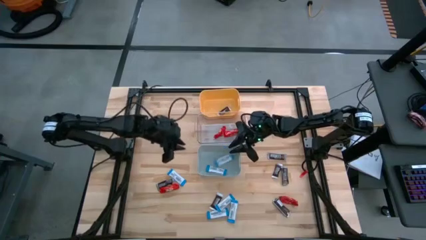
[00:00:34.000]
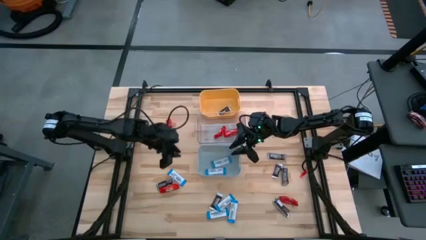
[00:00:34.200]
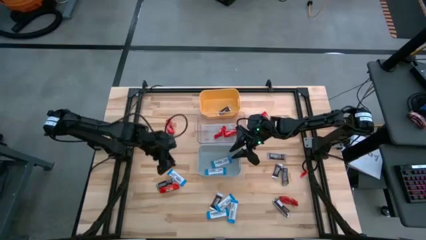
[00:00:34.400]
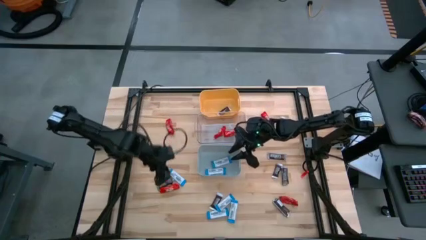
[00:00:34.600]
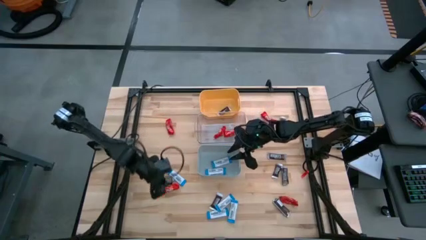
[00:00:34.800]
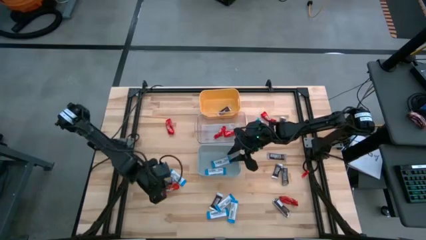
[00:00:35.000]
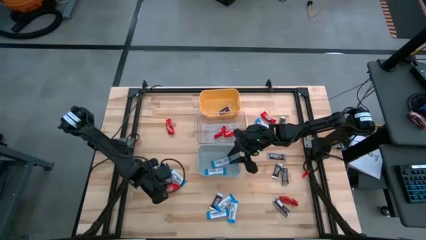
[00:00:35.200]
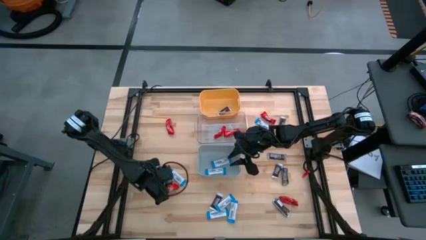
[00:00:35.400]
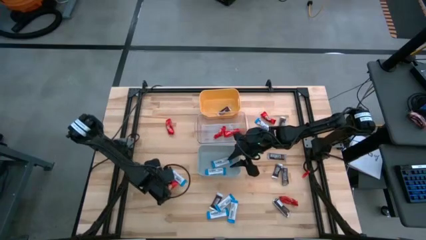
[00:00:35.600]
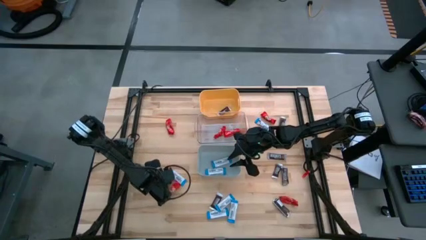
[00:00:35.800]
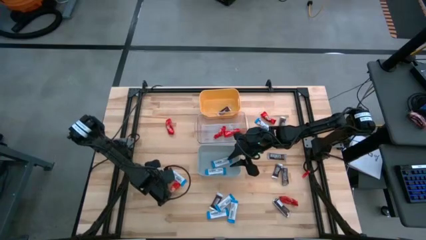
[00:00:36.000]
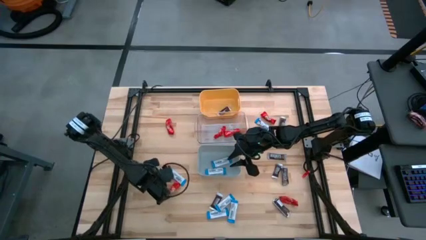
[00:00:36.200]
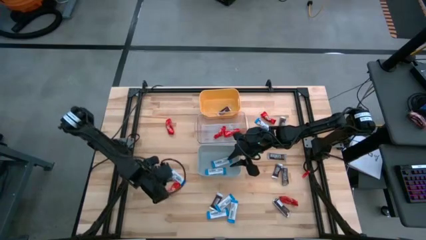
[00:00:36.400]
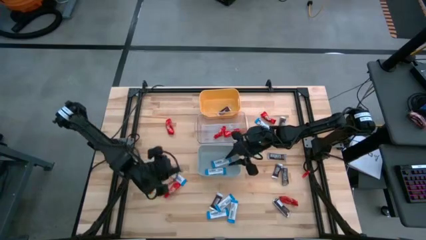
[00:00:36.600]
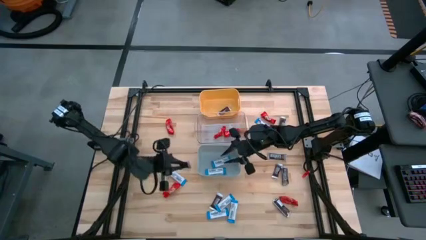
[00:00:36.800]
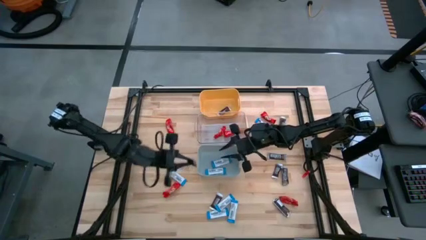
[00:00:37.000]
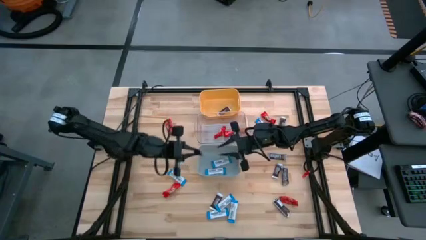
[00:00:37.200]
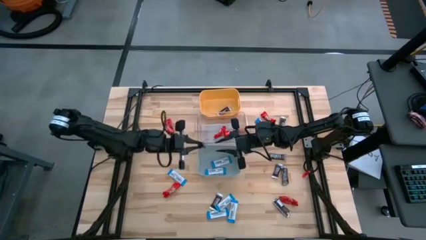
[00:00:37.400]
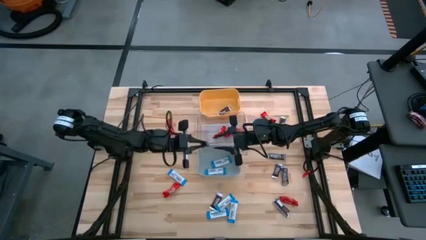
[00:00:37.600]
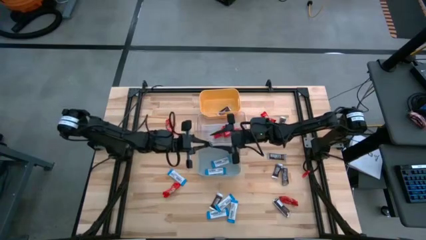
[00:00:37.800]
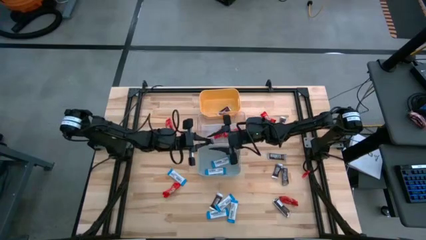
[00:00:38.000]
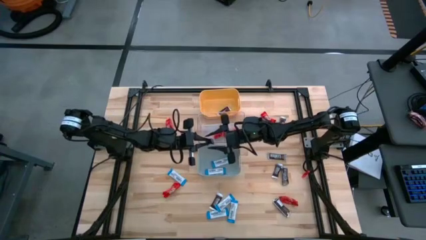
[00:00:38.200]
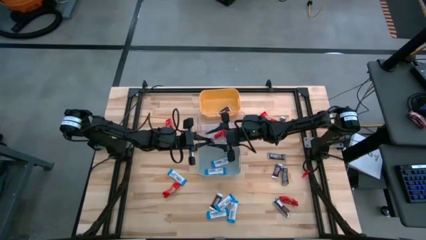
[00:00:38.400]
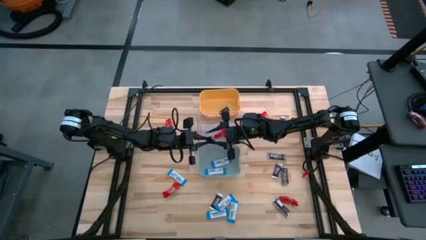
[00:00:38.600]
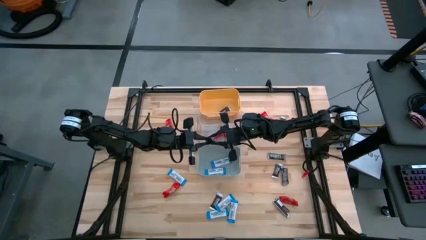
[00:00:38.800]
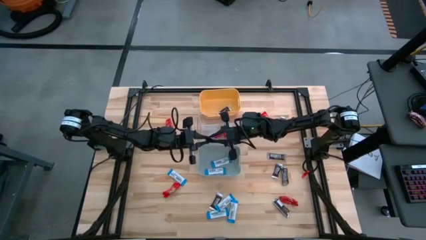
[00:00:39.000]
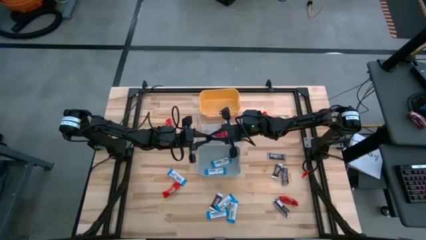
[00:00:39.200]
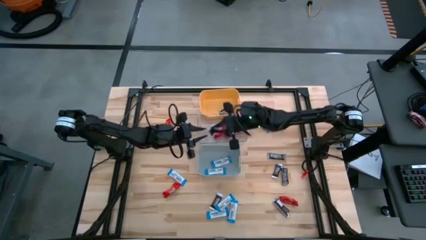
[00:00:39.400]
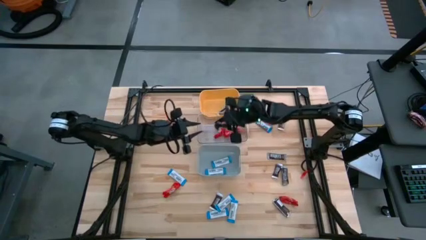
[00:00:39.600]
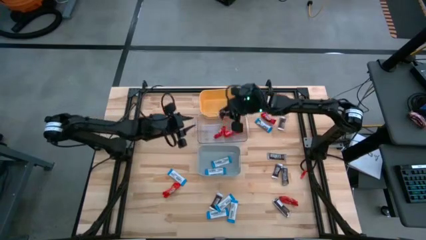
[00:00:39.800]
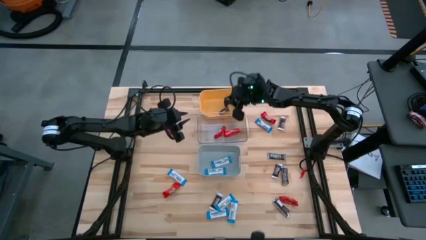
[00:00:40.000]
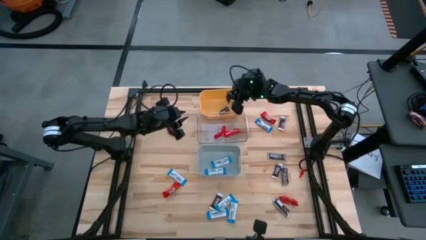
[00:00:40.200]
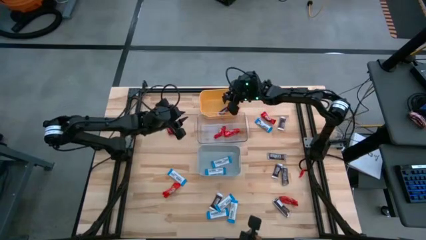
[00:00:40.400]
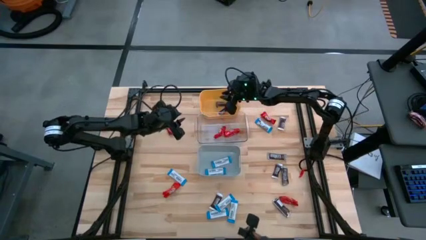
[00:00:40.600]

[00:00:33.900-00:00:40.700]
Task: Organize candy in baskets
Put the brown chocolate bar into the yellow bin

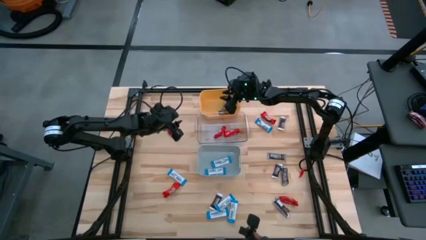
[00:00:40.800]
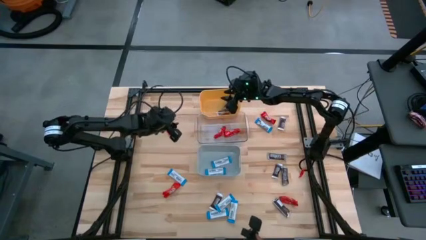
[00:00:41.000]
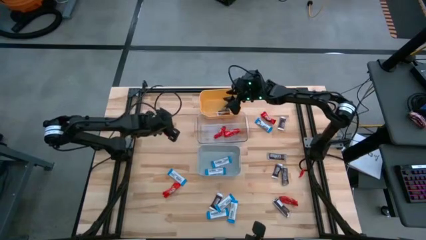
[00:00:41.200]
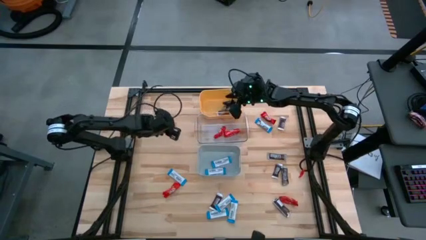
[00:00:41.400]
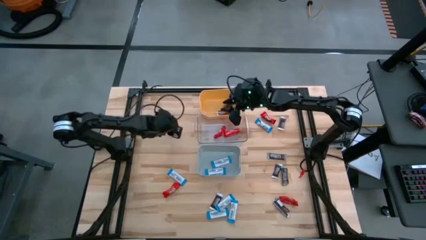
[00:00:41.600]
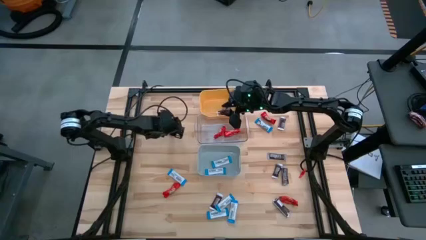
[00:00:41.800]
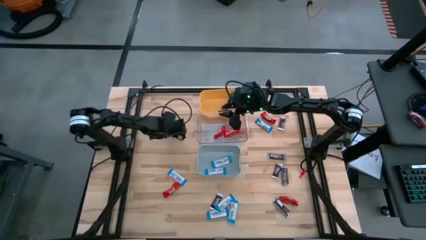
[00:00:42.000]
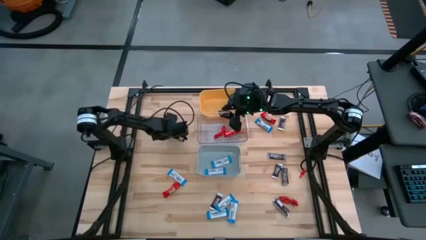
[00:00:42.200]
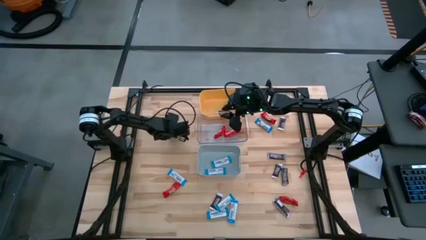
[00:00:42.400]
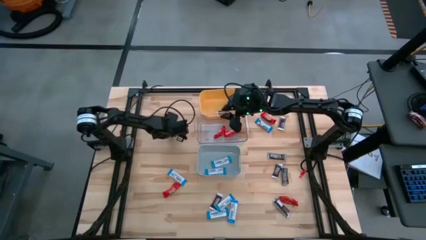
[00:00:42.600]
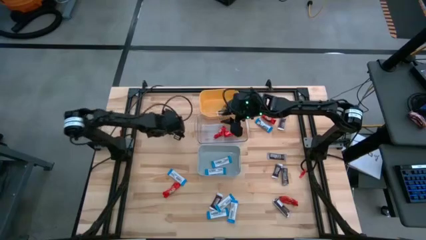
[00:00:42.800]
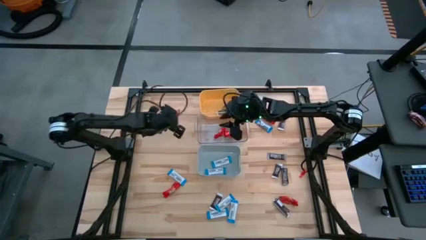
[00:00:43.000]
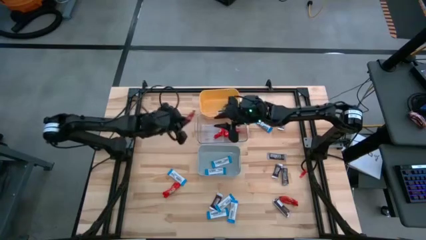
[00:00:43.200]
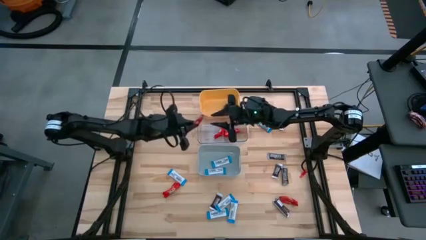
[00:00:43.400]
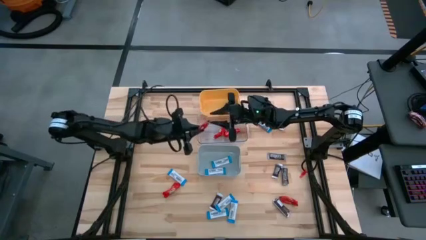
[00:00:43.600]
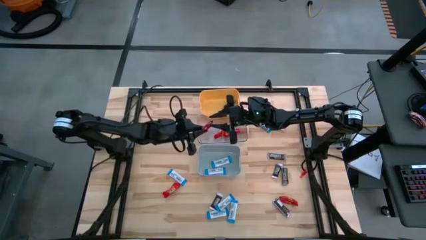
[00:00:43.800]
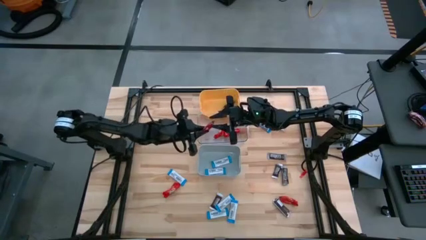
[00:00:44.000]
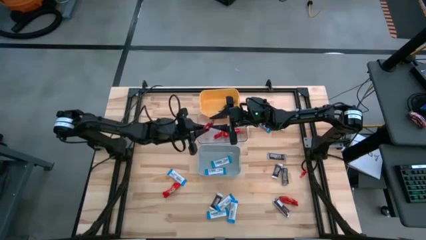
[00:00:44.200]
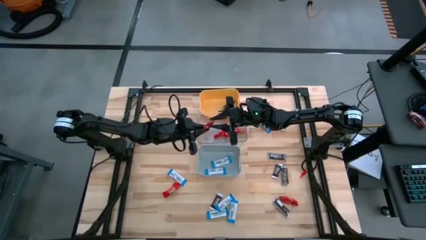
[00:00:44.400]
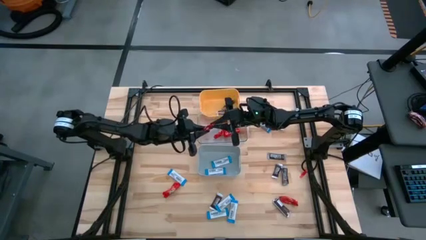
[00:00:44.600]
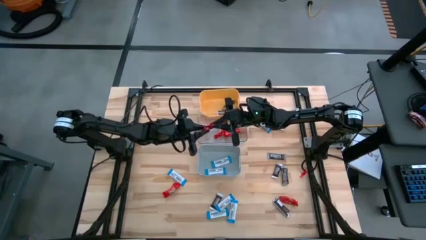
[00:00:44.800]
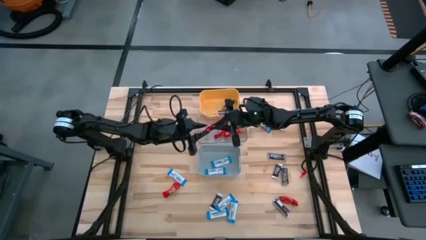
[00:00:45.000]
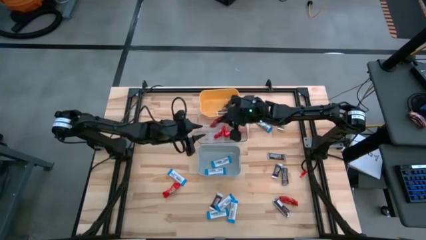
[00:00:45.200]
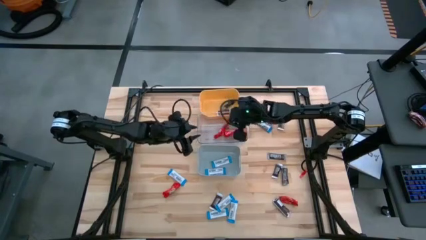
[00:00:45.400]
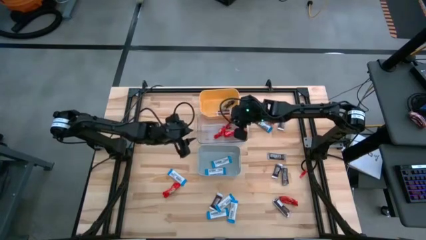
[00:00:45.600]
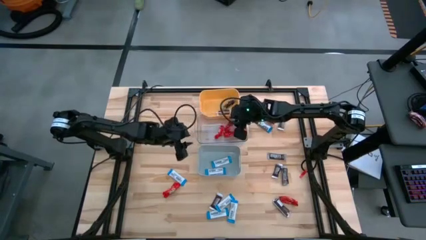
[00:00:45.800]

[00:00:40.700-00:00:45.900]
Put the red chocolate bar into the transparent bin

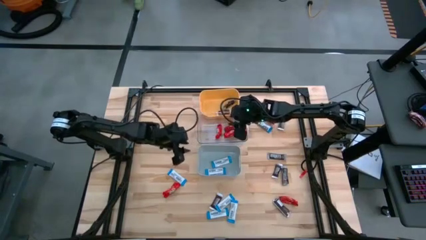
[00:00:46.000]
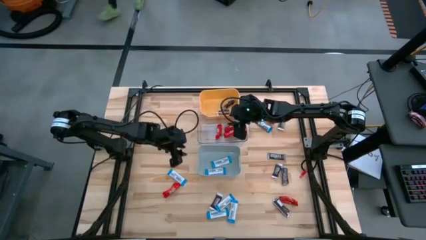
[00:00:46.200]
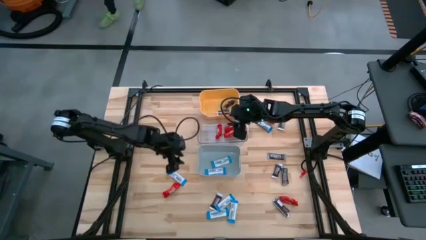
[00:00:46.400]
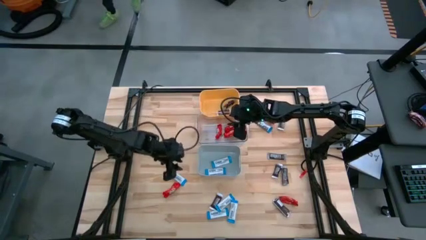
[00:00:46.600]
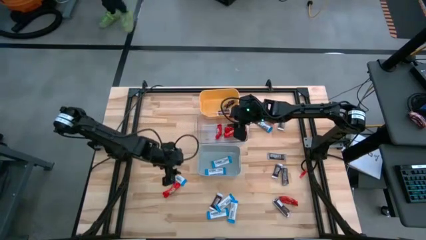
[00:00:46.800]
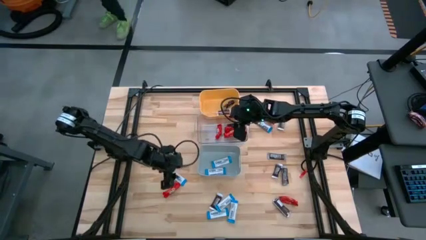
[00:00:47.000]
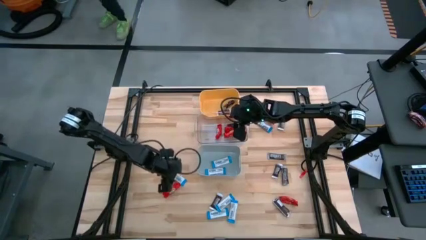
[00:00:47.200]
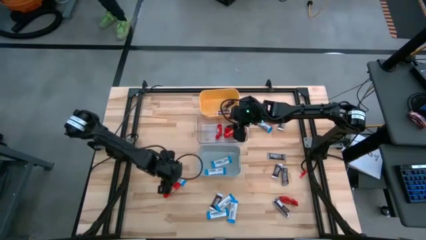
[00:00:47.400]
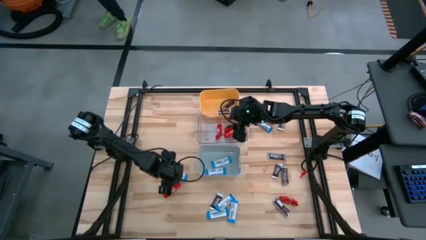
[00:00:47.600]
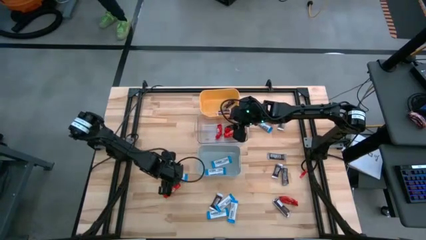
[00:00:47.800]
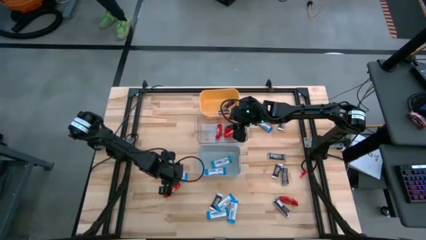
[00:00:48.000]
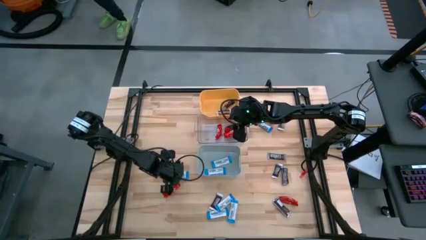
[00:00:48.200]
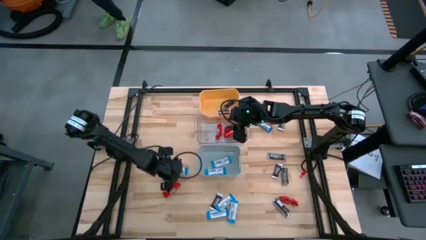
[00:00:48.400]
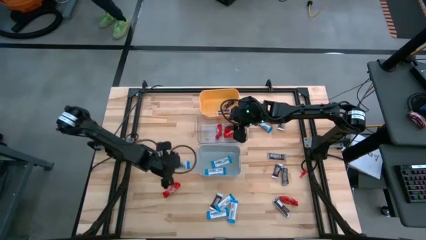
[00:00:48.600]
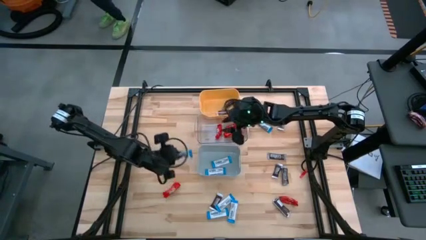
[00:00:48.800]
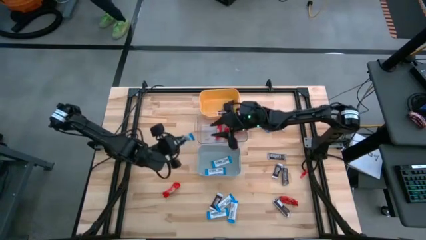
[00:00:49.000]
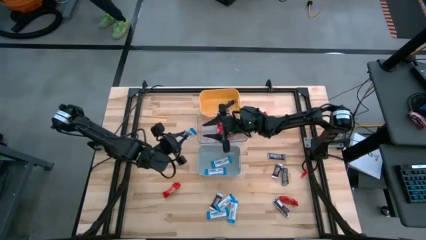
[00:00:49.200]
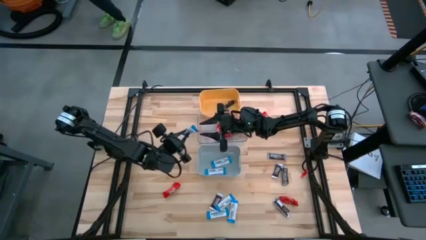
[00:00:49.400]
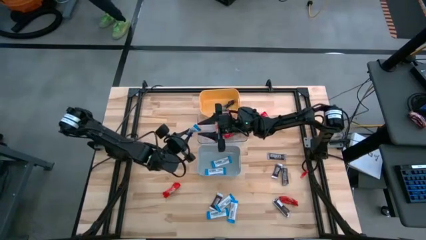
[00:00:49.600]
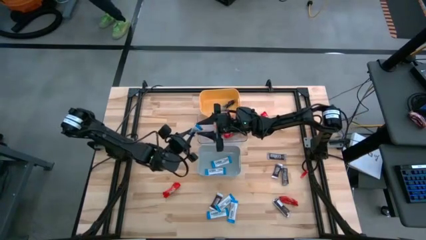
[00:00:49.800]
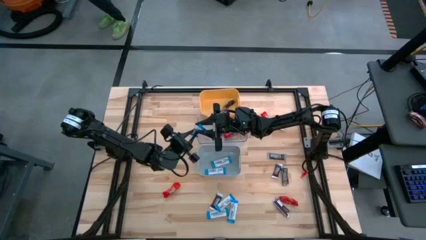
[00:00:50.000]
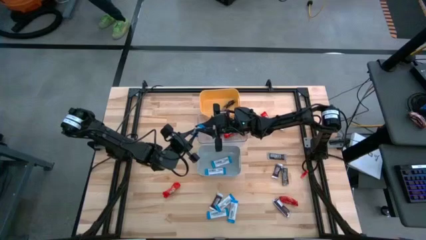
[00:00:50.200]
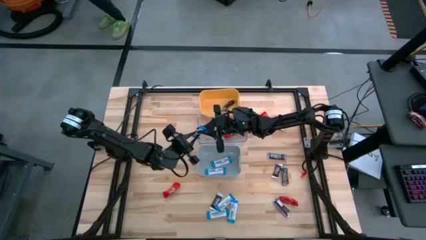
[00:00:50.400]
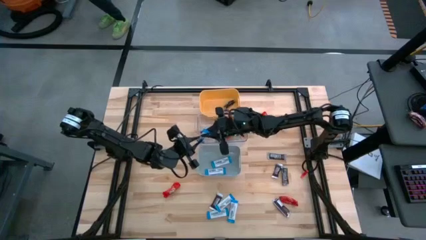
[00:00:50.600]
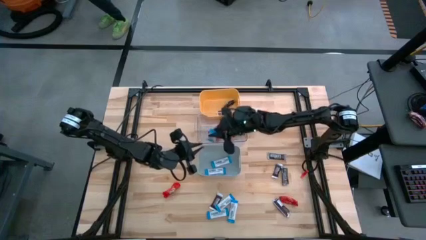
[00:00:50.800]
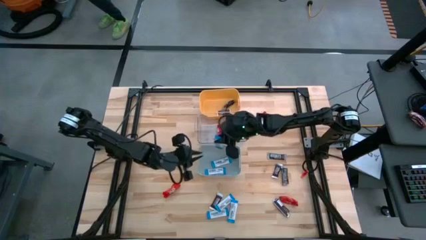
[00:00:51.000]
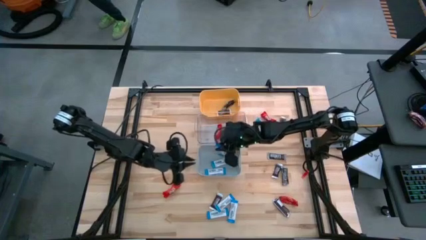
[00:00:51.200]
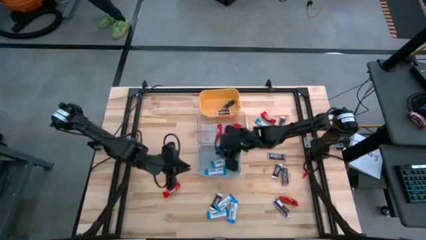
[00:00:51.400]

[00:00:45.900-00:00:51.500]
Put the white chocolate bar into the gray bin
